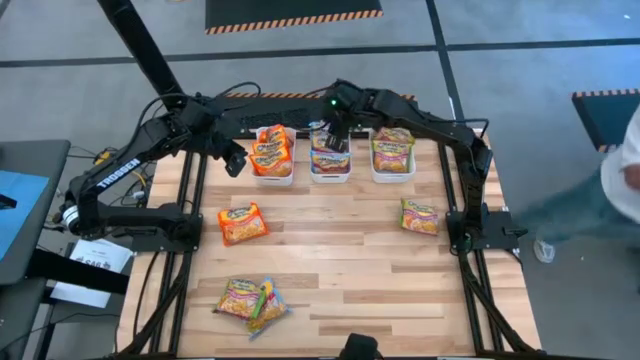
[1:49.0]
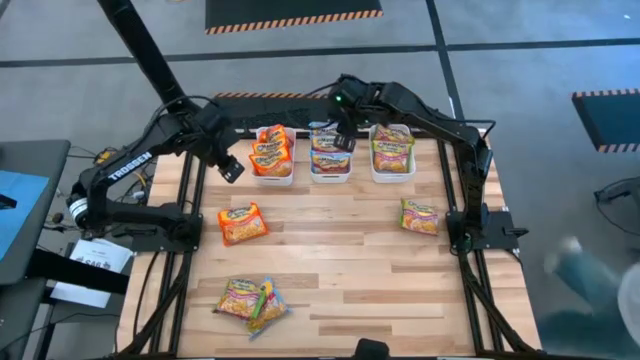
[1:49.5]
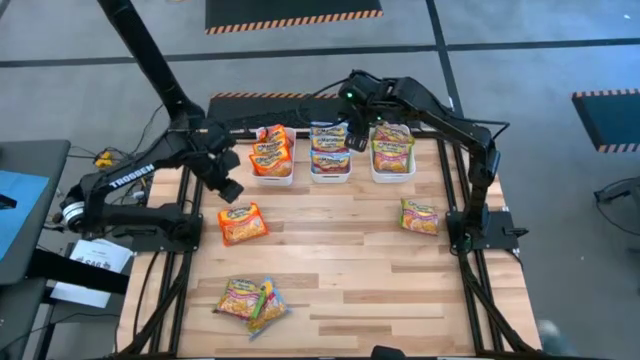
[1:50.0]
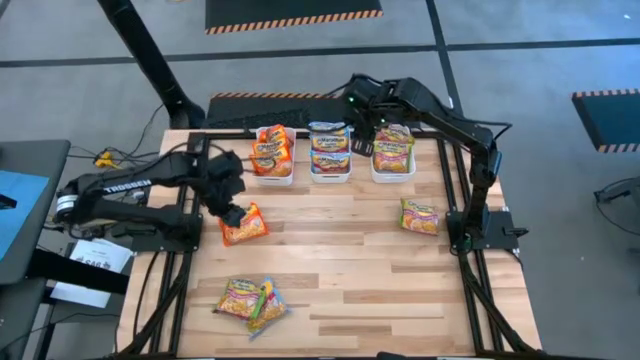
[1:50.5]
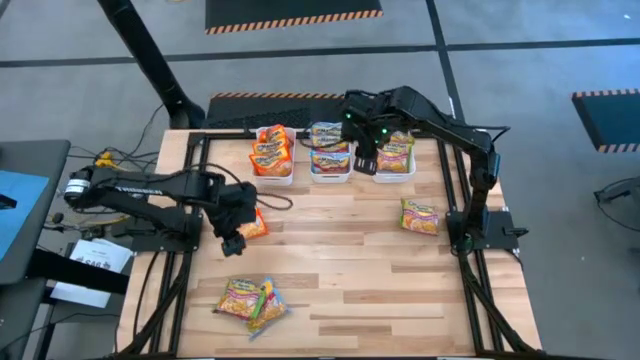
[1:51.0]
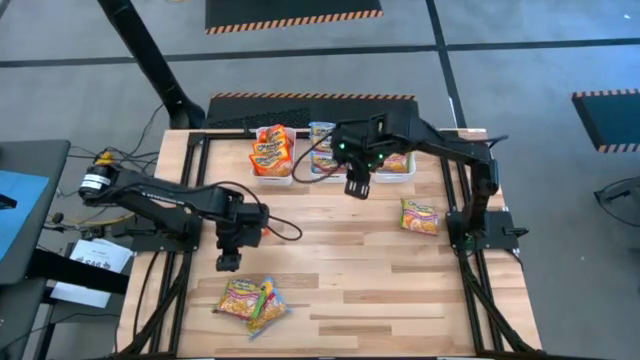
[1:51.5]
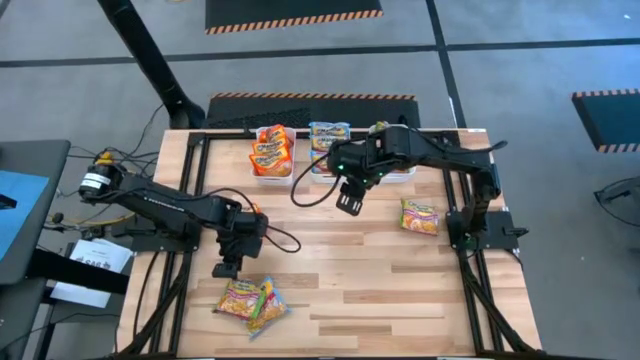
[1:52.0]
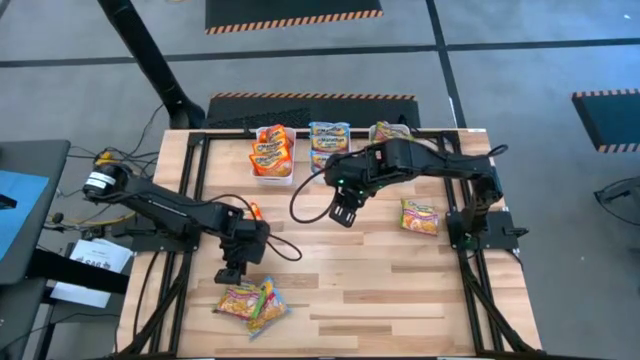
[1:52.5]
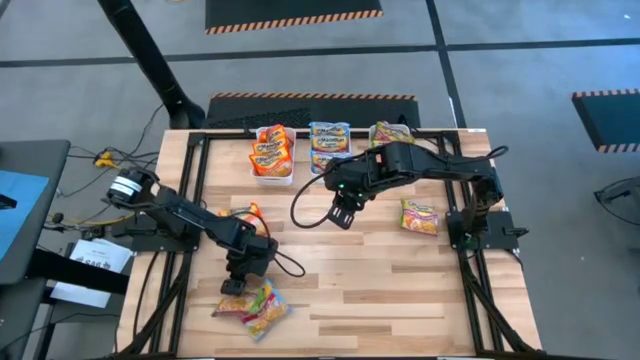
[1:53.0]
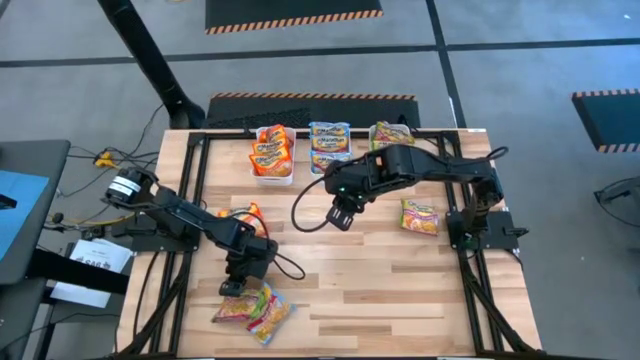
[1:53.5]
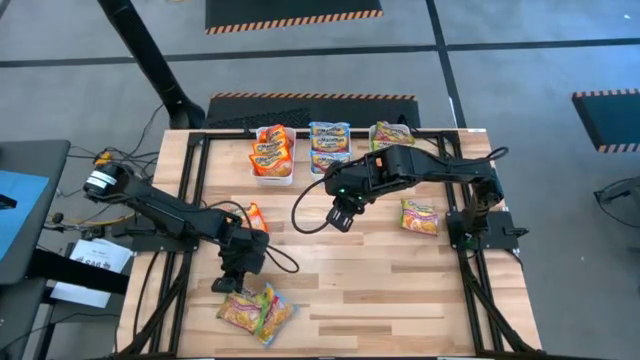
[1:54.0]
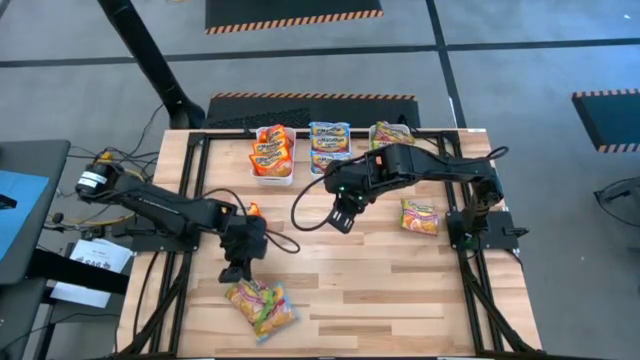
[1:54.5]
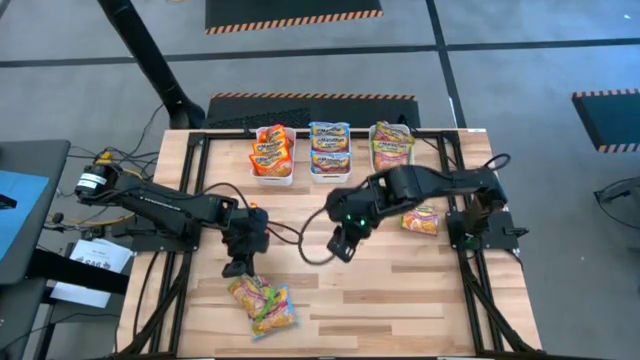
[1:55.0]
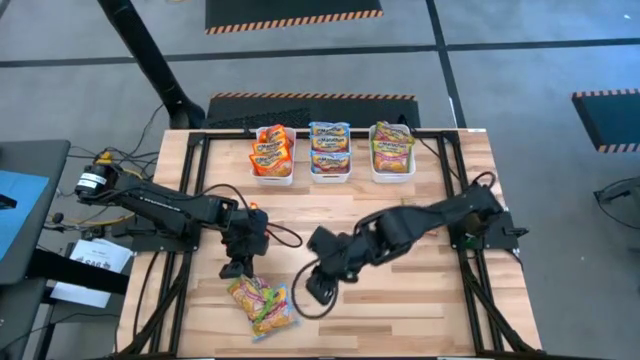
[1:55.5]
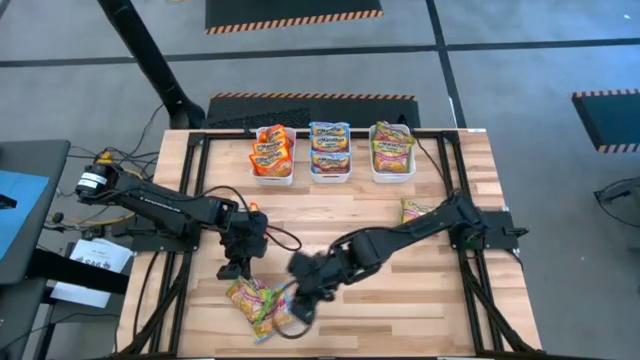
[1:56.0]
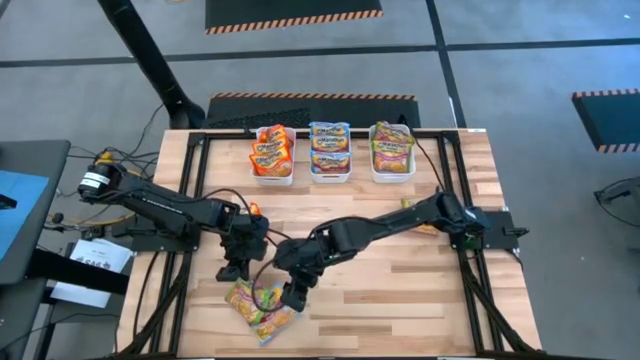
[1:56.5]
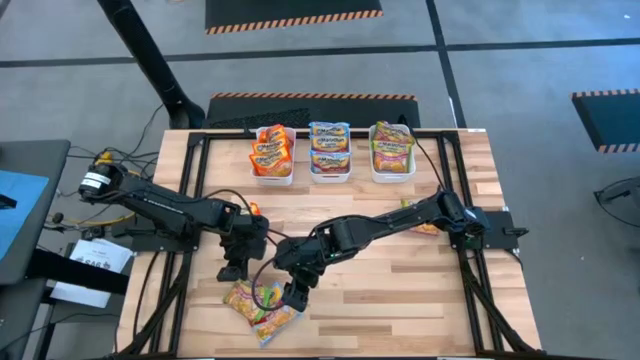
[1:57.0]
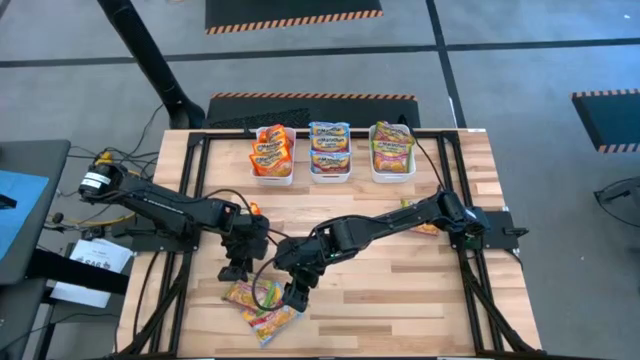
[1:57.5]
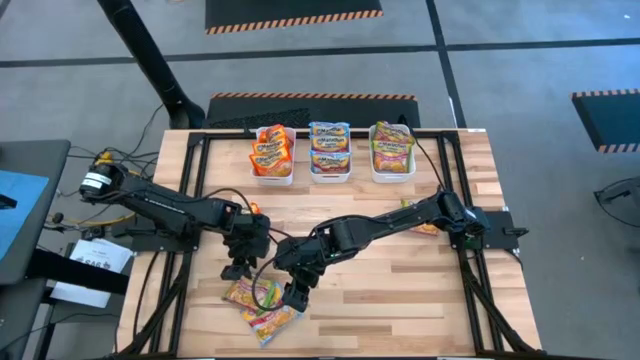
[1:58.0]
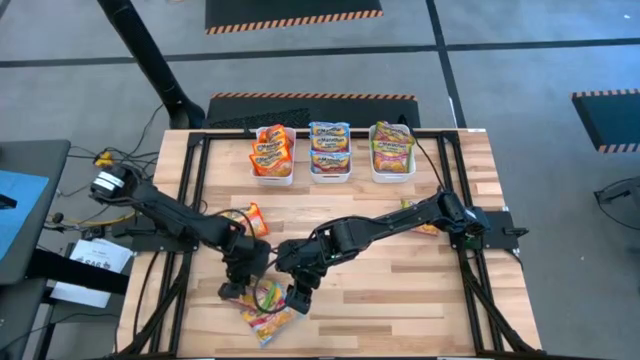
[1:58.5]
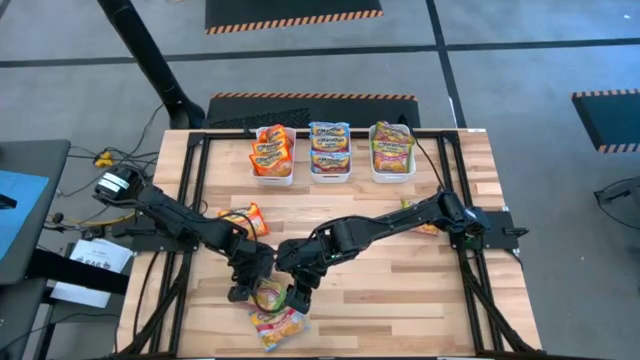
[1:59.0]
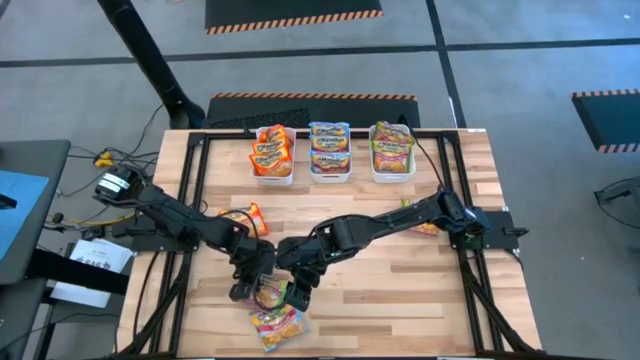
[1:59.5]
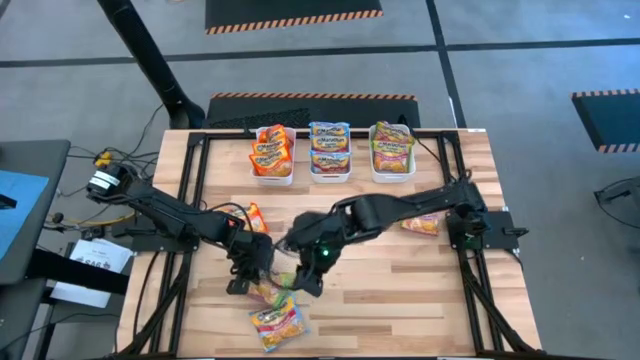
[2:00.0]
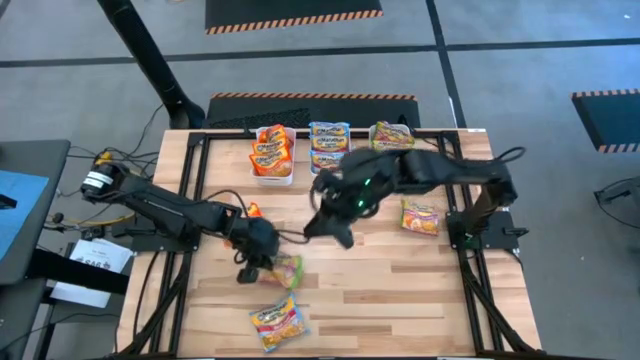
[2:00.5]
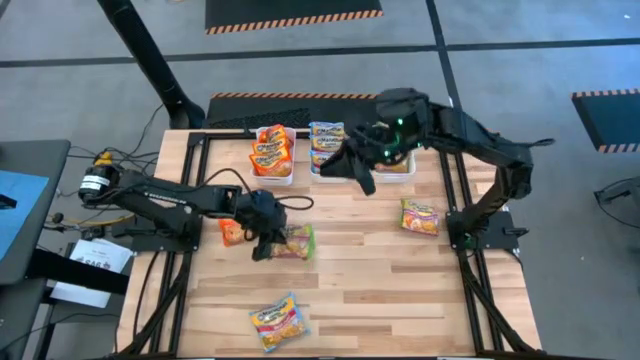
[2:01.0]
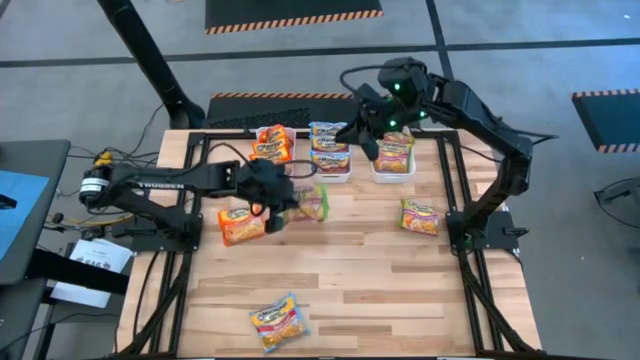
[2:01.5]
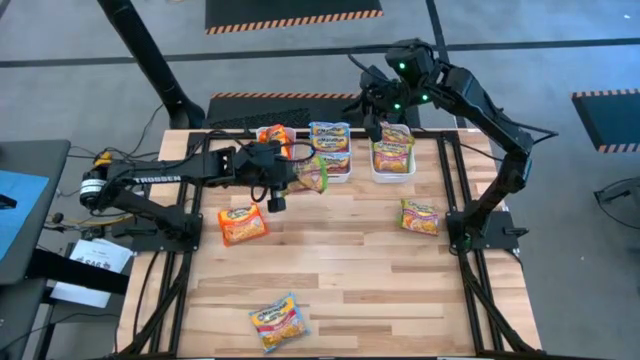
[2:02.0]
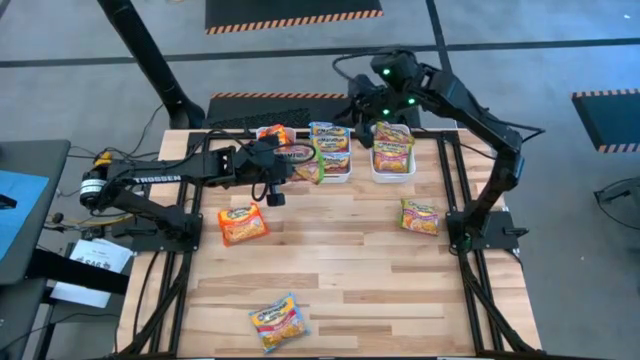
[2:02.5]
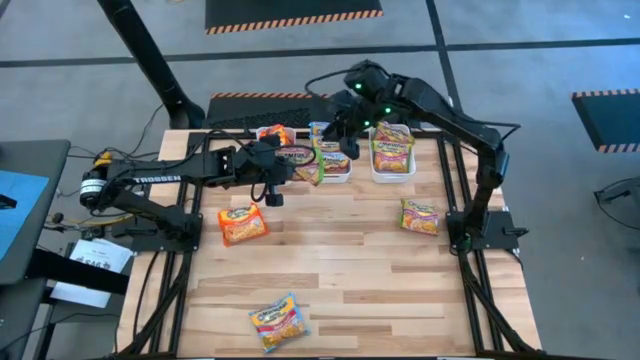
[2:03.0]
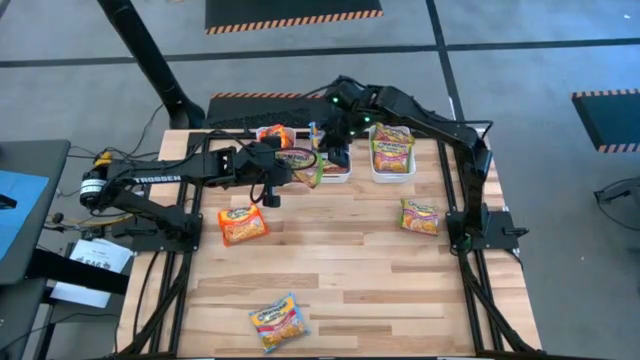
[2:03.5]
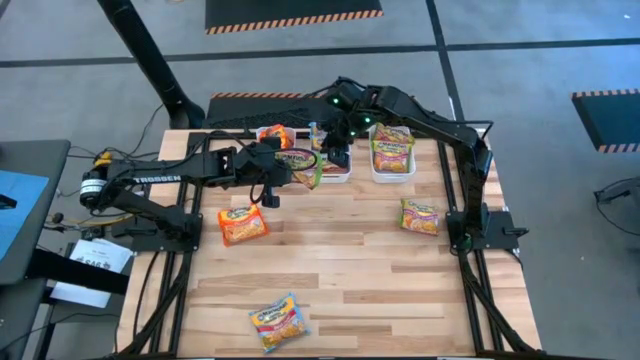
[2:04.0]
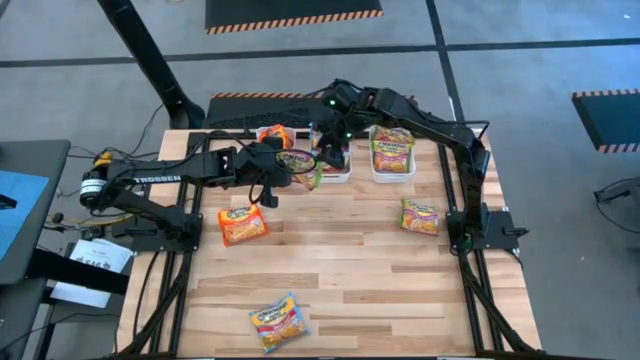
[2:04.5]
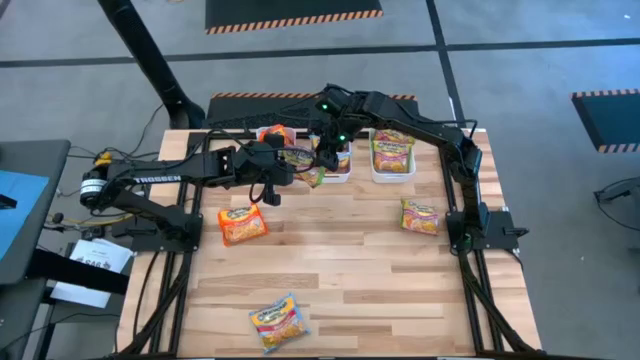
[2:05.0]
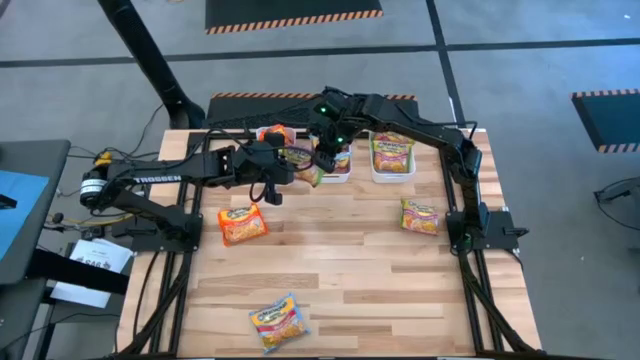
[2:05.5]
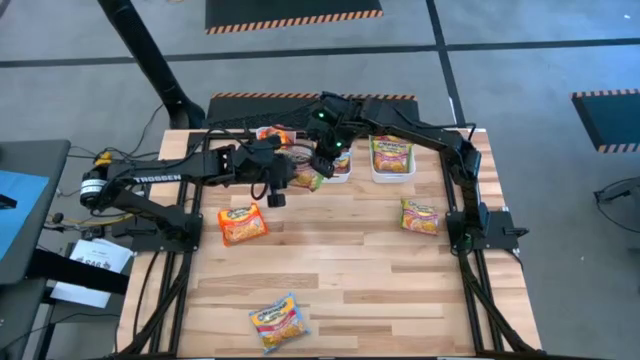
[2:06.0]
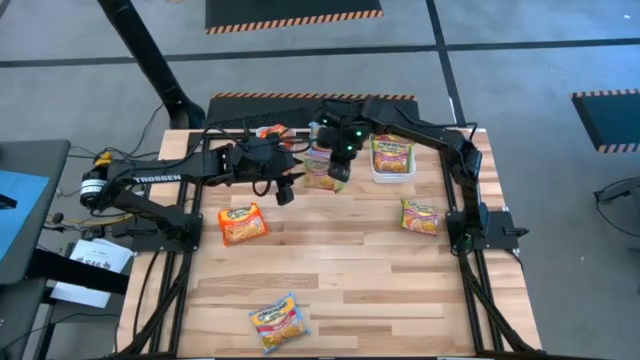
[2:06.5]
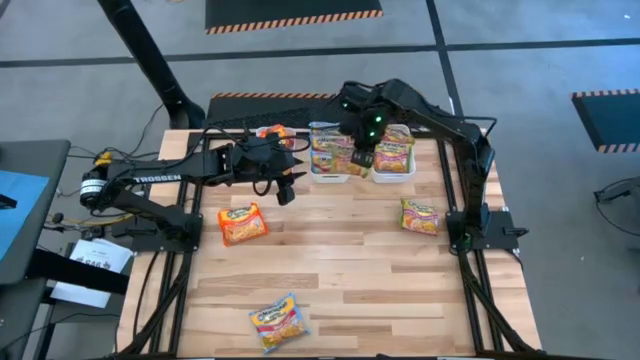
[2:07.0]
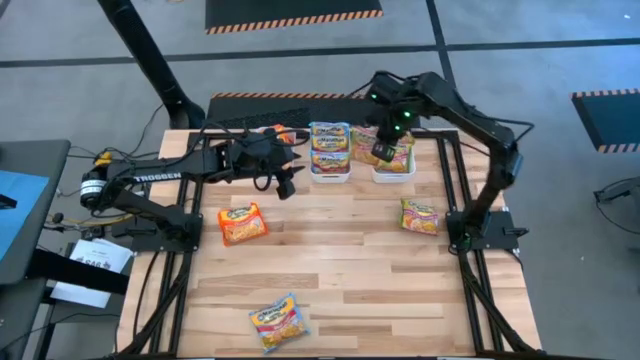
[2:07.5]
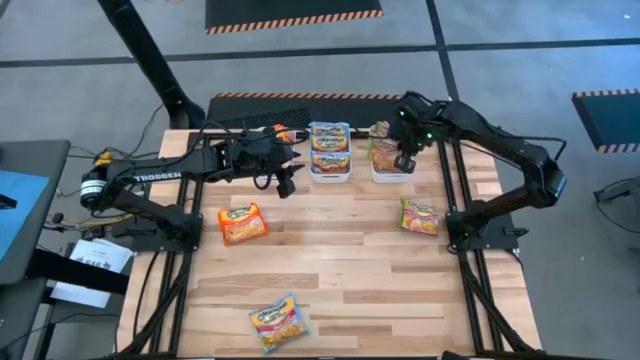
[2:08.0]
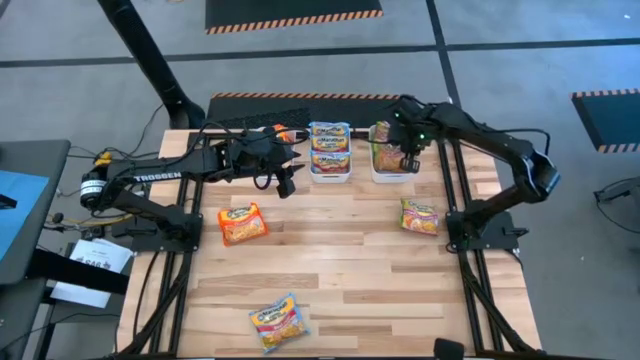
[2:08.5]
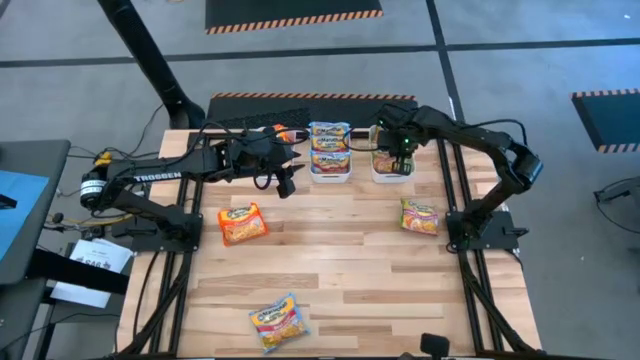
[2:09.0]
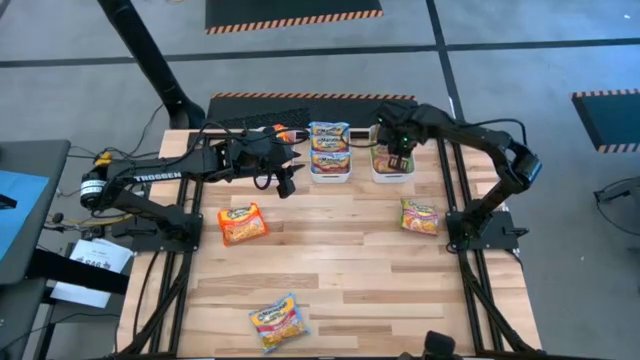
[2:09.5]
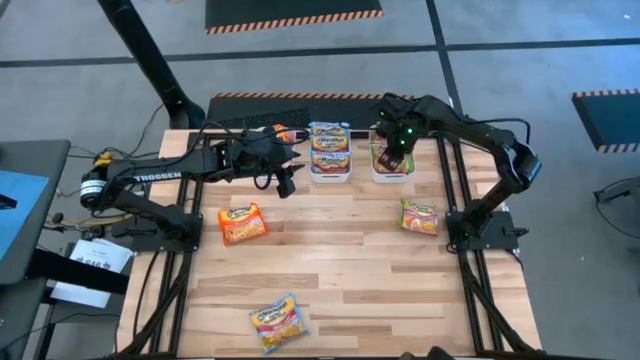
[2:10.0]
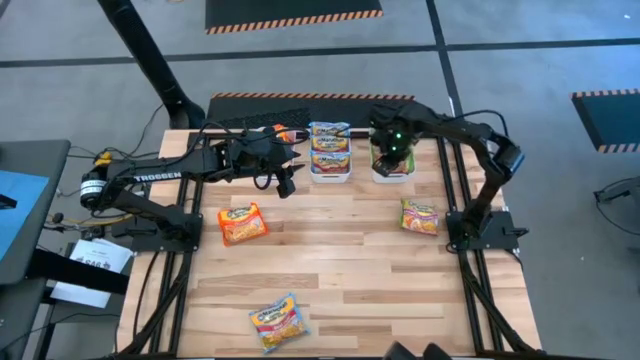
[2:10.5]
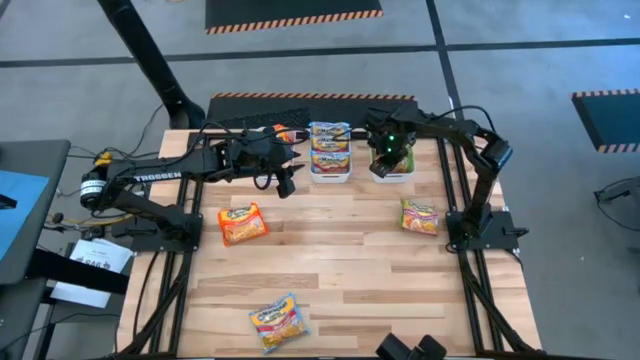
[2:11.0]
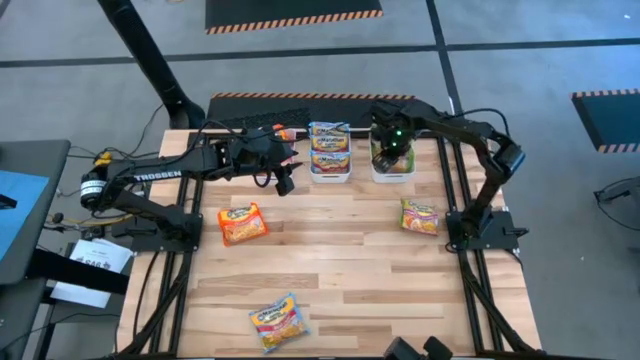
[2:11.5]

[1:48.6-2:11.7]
Task: Sort Maruchan noodles
Put the green noodle pack into the right white bin
